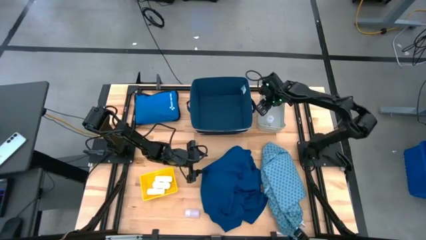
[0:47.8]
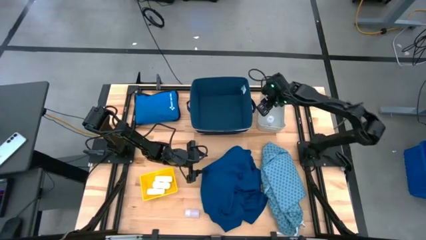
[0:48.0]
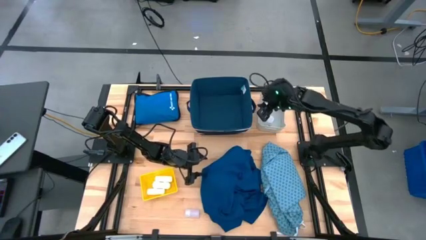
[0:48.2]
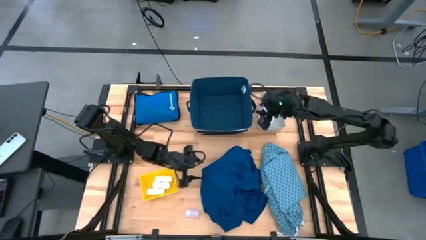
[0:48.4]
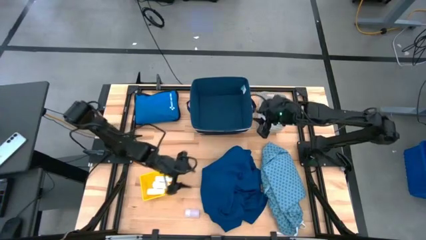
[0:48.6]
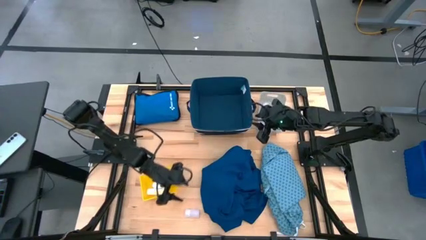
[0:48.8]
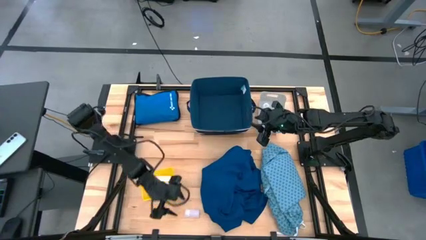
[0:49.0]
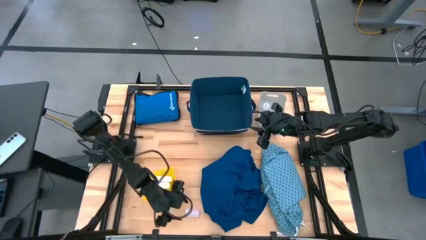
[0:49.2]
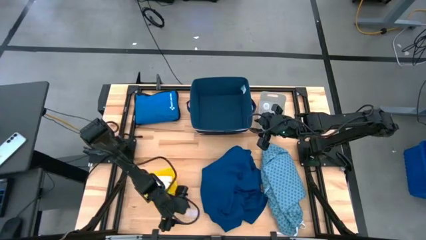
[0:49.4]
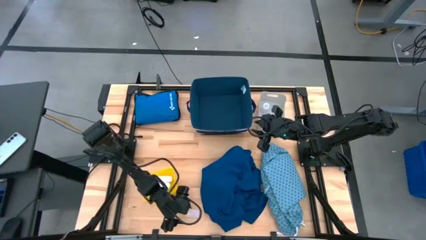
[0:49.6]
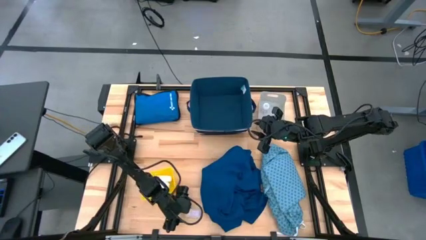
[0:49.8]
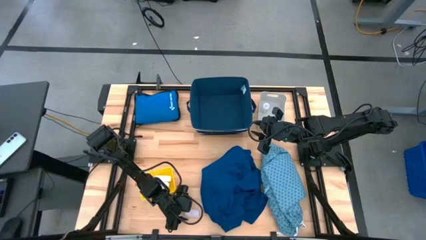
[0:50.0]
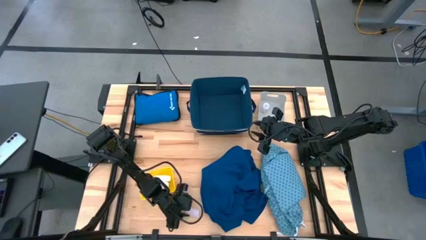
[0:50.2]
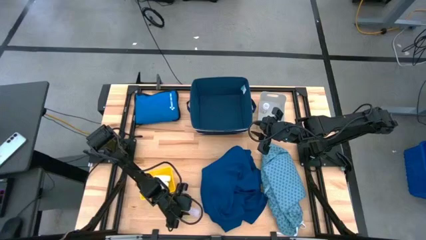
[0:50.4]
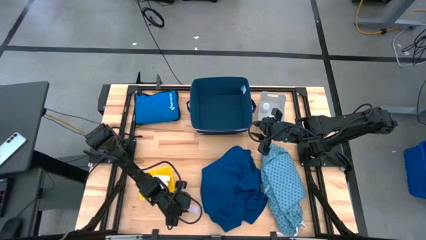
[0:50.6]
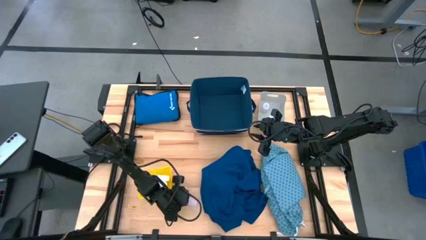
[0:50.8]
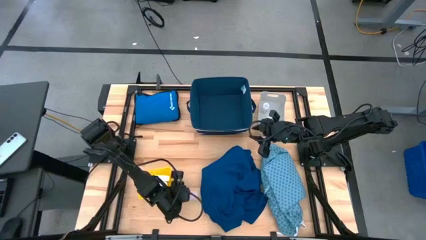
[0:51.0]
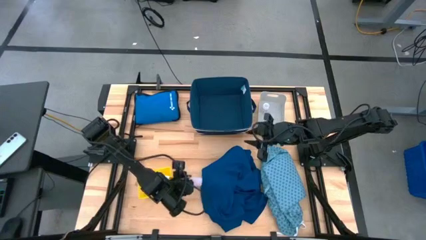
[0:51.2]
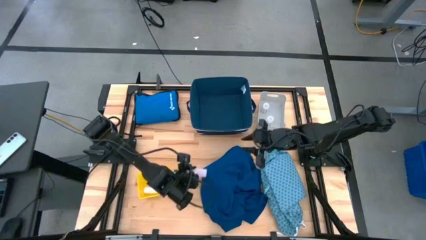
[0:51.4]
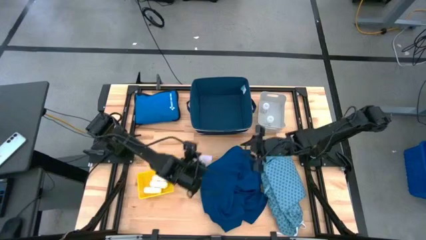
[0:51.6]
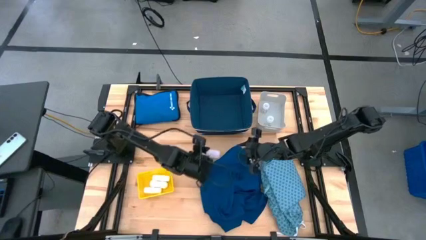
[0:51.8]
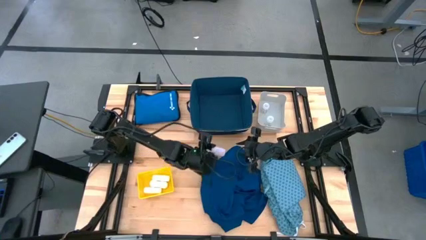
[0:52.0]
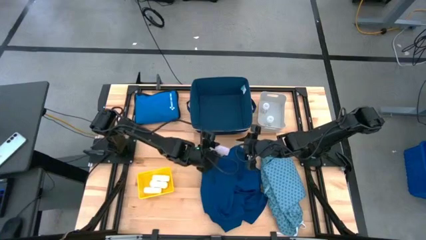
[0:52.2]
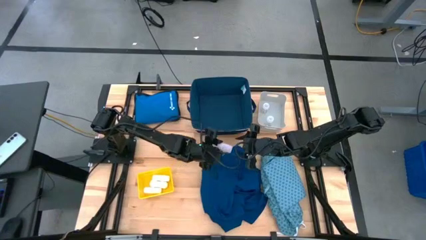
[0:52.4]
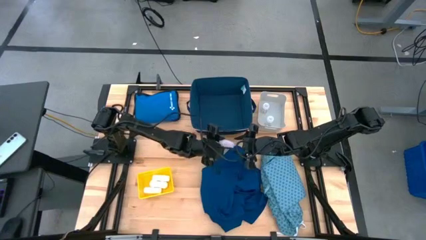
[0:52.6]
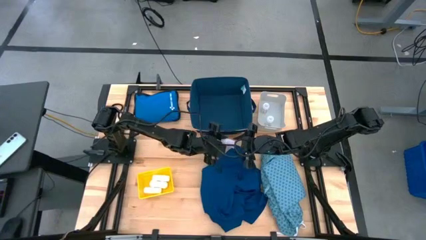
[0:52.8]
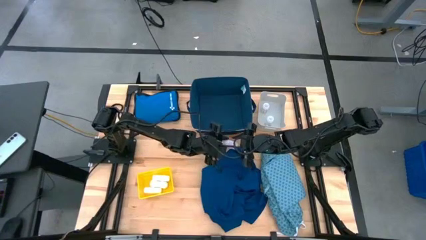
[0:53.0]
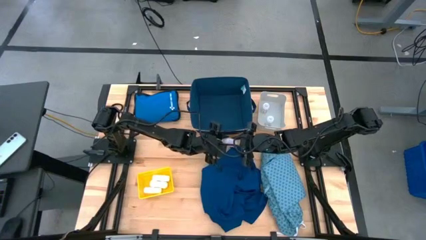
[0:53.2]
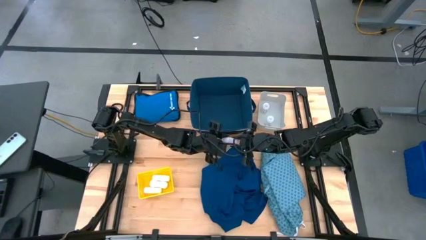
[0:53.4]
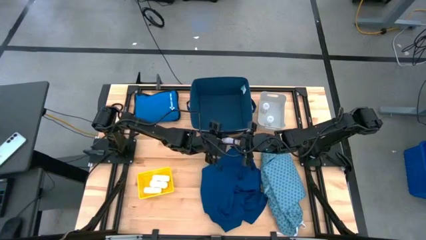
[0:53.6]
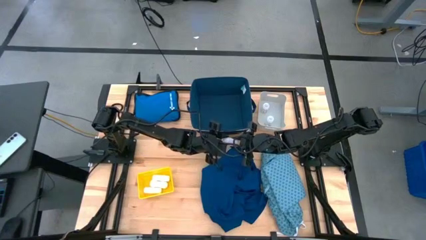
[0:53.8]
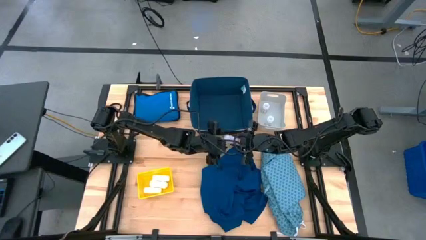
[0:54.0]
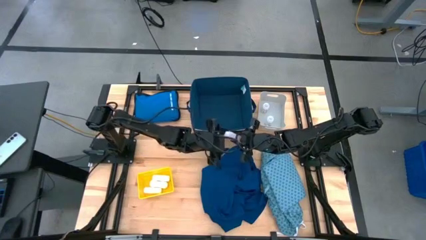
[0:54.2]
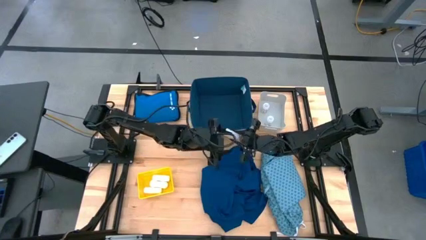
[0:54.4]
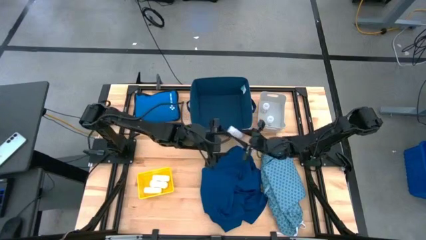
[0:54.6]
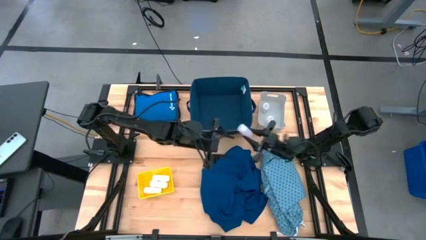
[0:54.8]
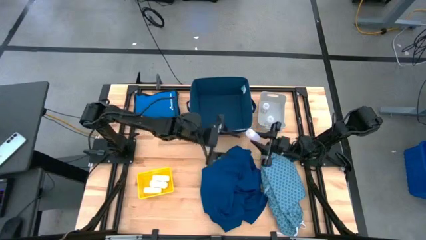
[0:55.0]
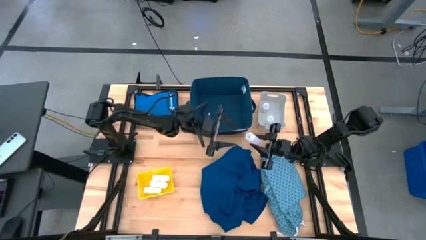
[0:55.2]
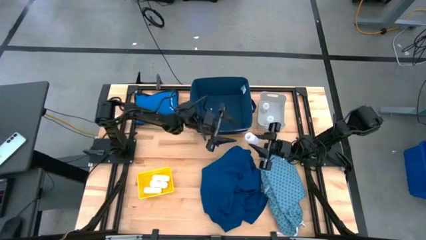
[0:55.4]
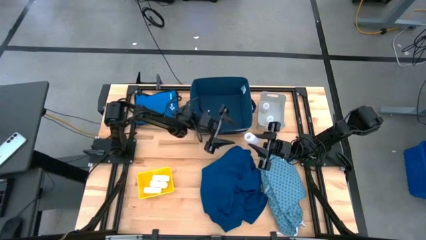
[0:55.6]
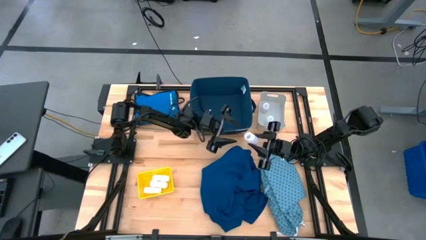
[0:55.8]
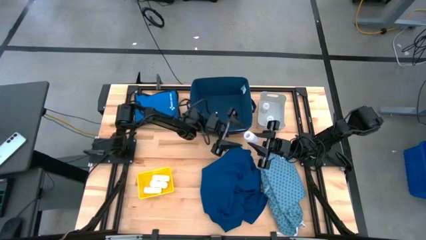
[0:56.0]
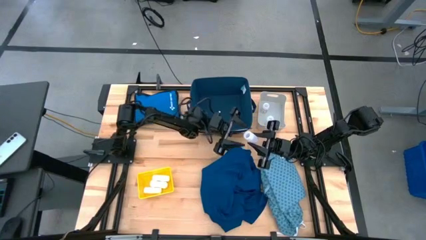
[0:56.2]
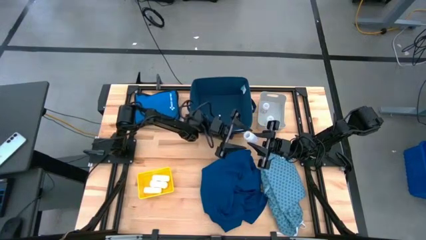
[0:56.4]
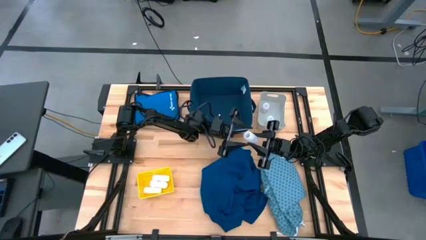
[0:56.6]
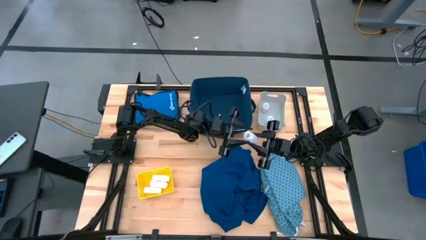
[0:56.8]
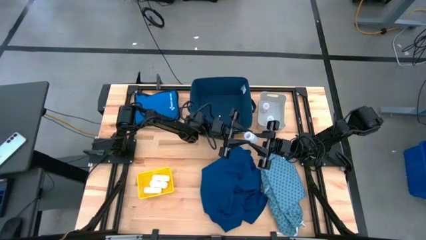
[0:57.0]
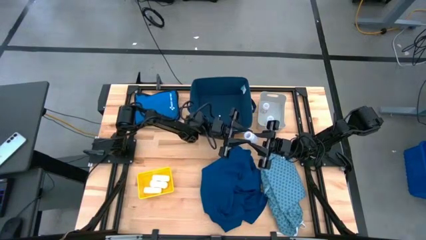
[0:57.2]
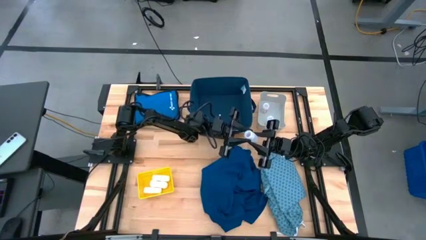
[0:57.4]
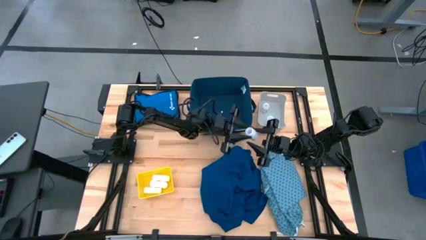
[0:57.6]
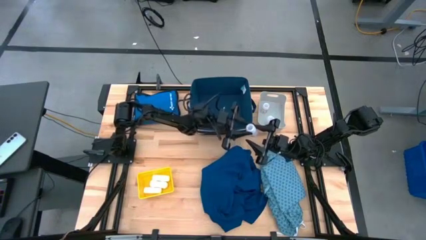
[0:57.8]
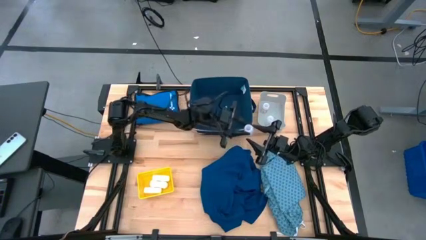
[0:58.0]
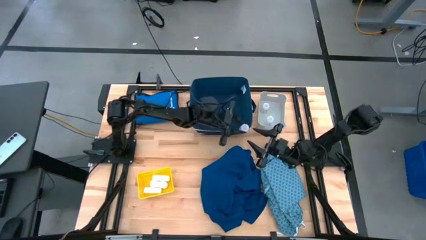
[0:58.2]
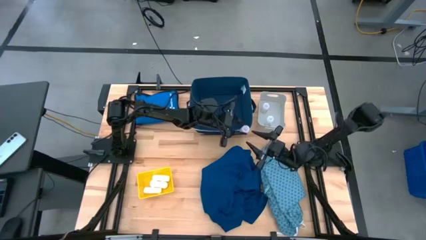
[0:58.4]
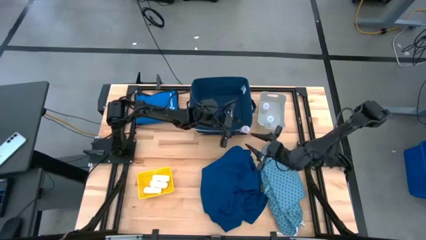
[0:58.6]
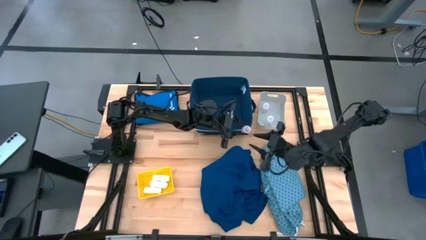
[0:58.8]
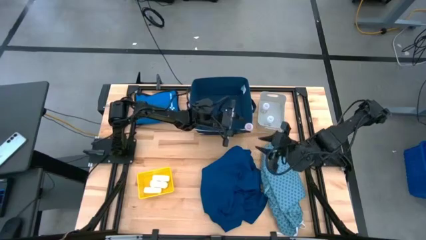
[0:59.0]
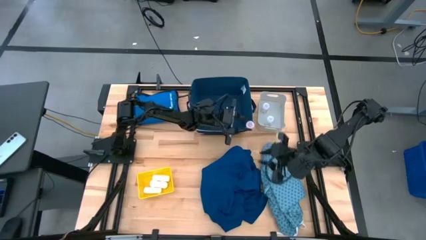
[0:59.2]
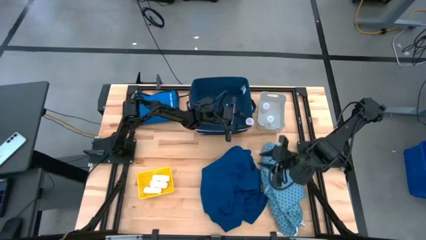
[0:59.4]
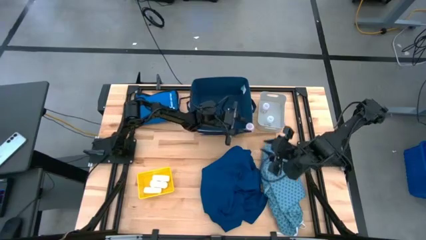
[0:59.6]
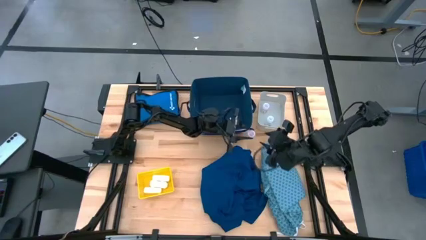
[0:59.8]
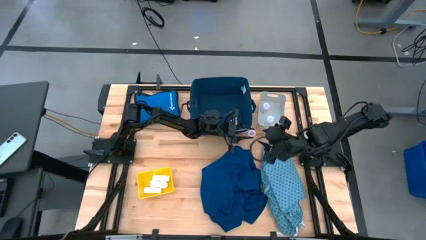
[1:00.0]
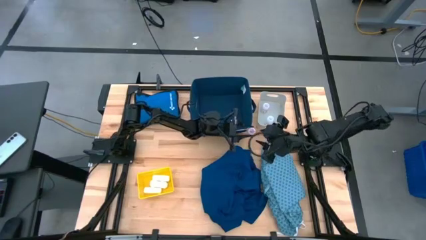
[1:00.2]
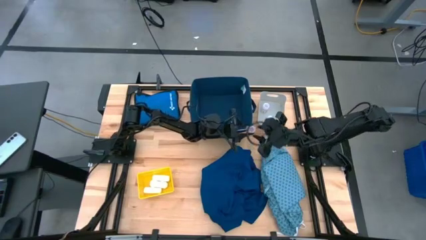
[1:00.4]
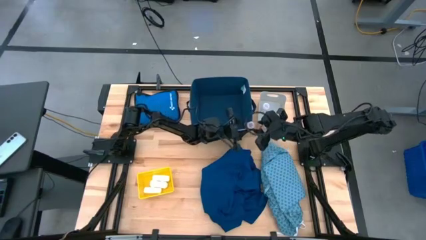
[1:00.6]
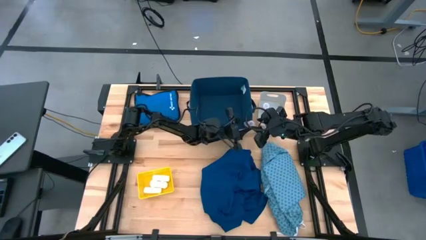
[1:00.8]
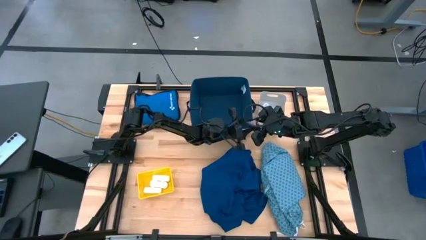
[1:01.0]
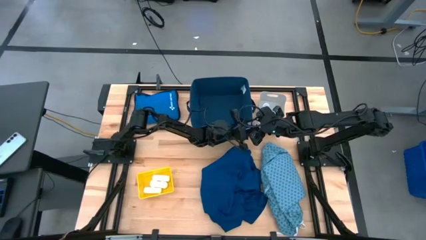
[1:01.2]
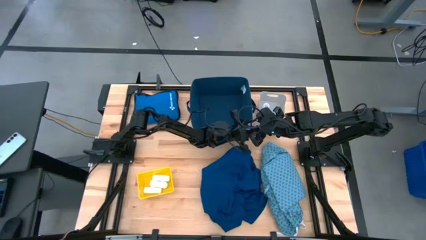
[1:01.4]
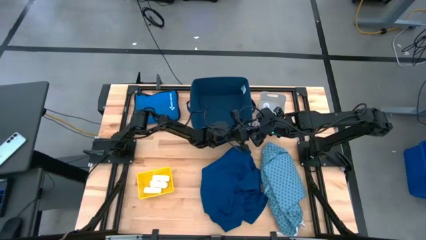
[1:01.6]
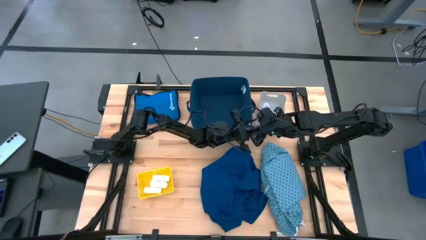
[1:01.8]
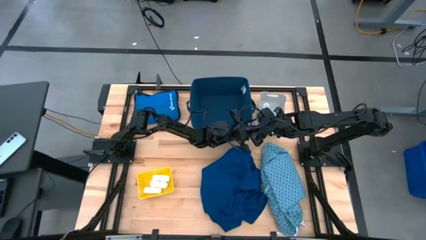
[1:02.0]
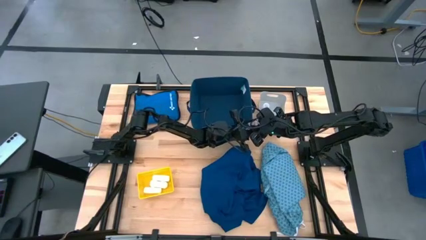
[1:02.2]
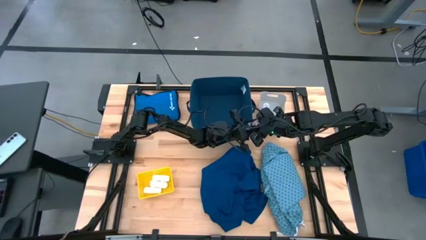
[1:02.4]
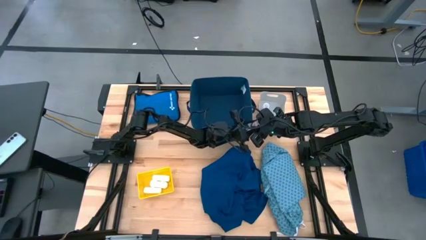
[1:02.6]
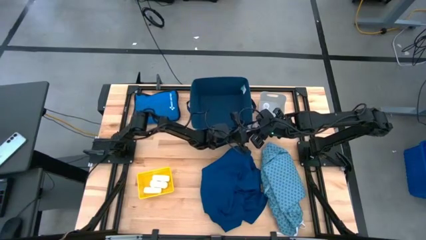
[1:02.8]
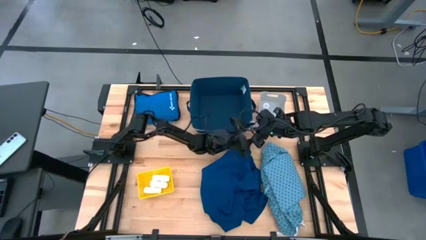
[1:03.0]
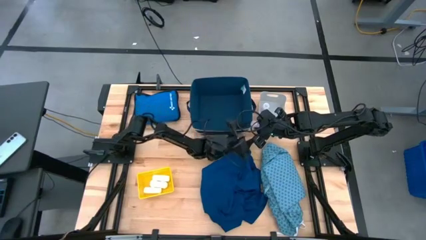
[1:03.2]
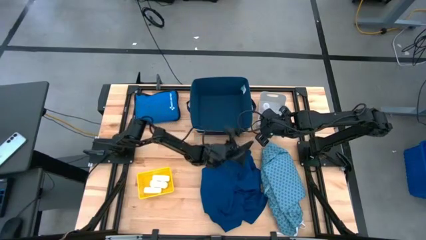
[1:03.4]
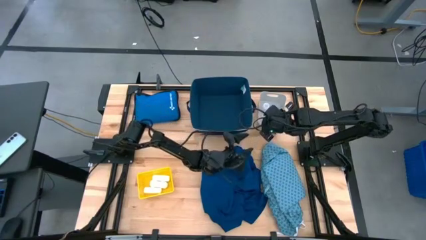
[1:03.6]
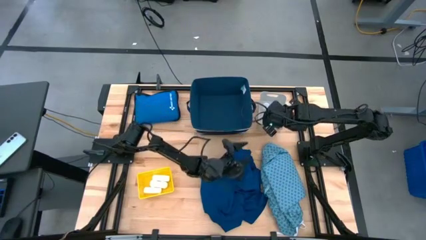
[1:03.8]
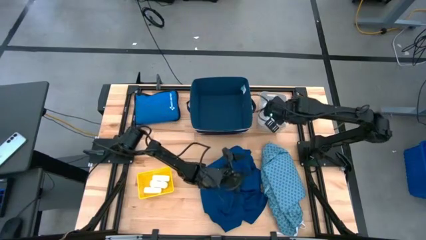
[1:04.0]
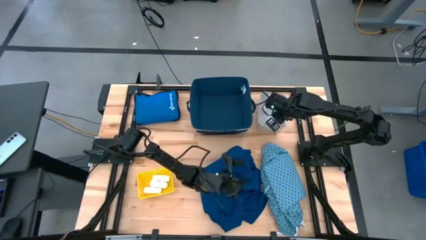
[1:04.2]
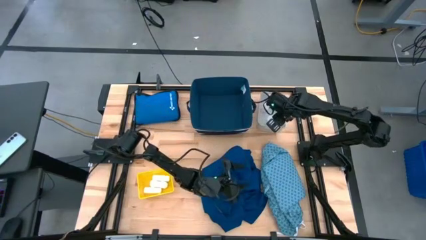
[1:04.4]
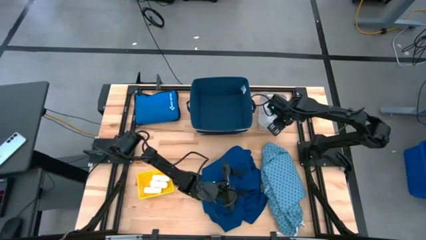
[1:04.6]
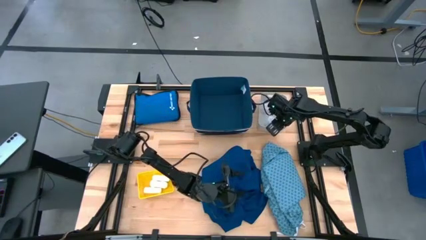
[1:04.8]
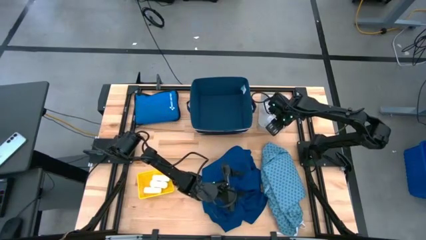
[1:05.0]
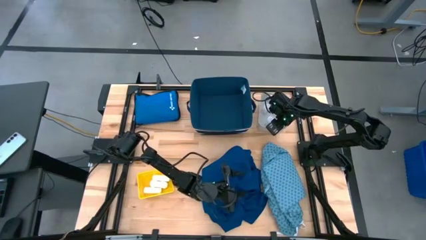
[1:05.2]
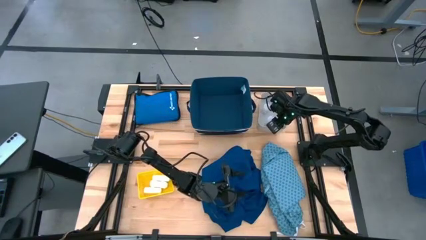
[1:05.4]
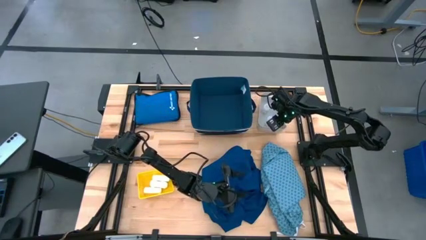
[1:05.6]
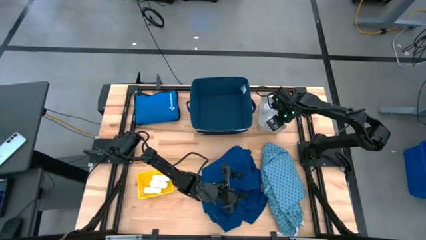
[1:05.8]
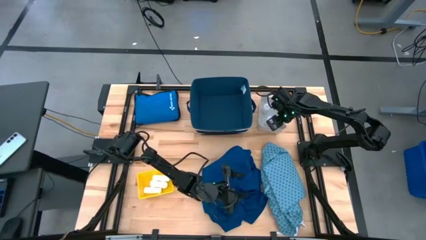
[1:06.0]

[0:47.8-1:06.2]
Task: Pick & Place Medicine items
Put the transparent pill bottle into the white bin
